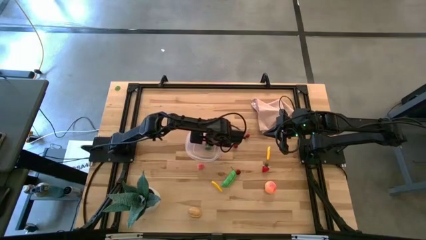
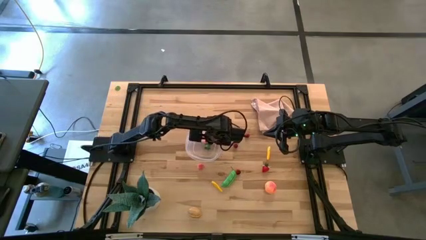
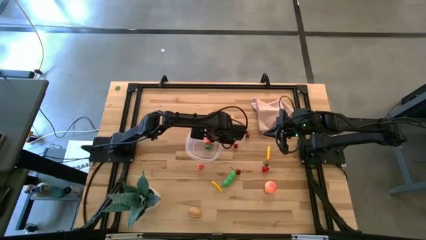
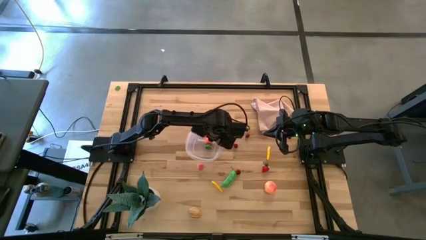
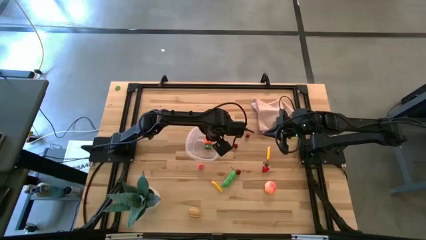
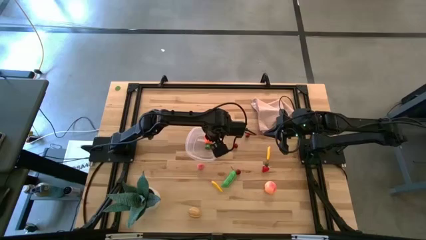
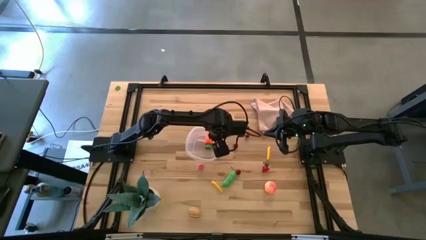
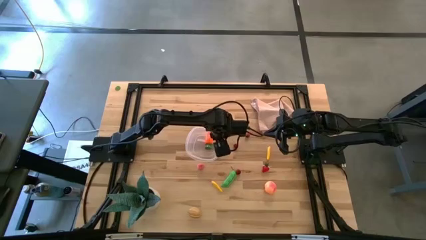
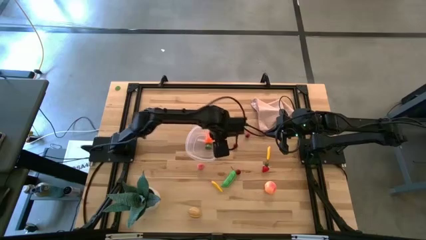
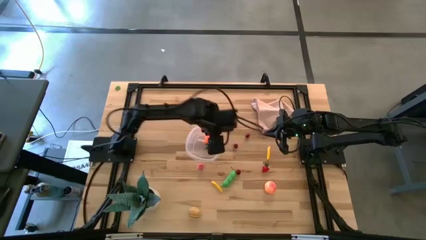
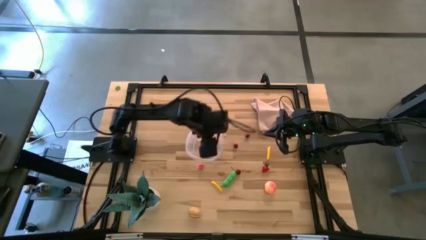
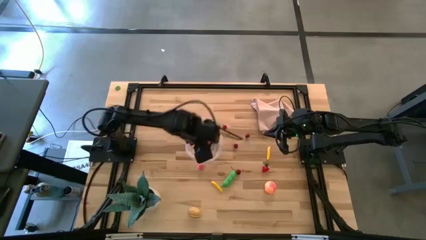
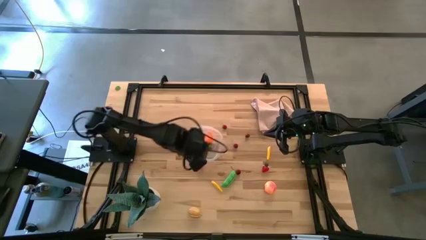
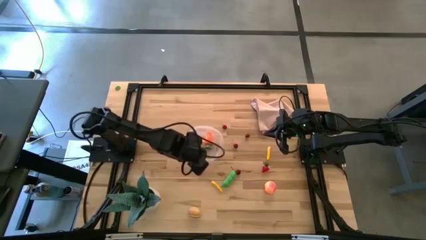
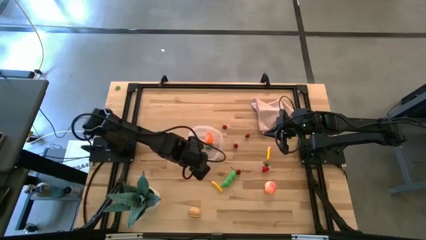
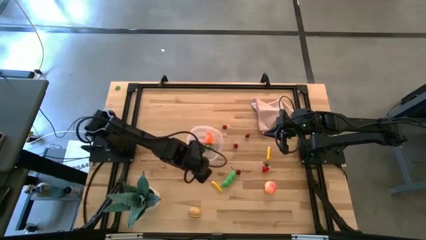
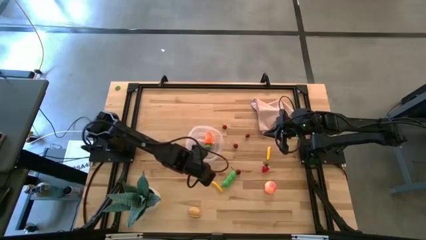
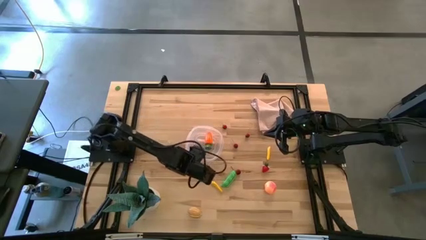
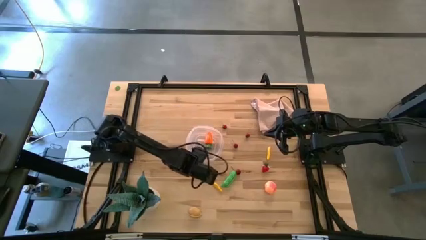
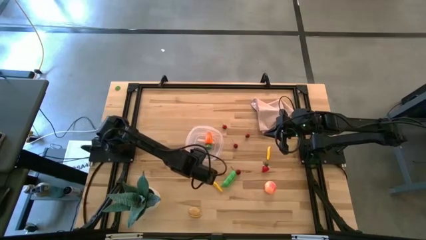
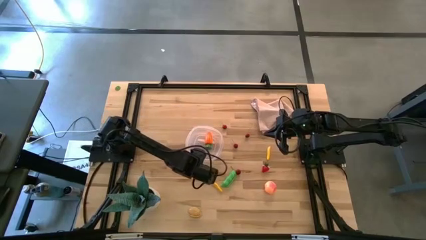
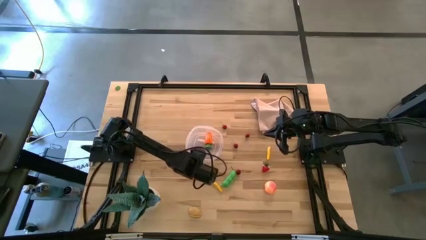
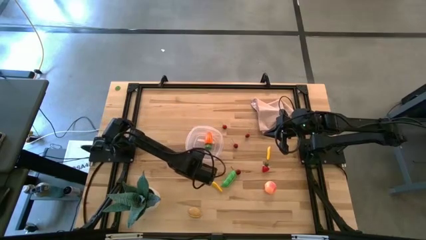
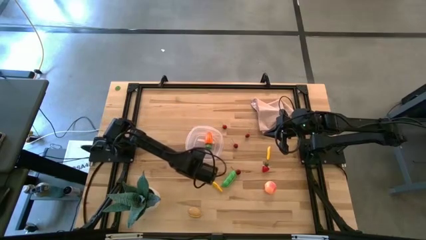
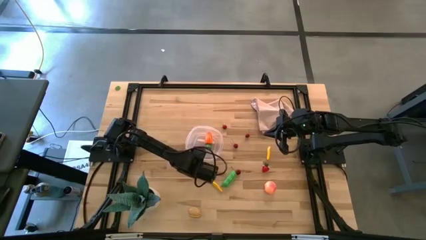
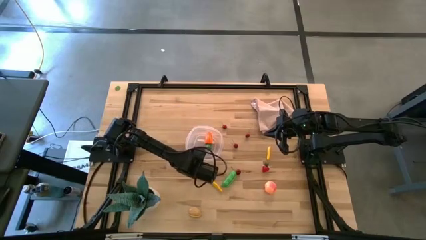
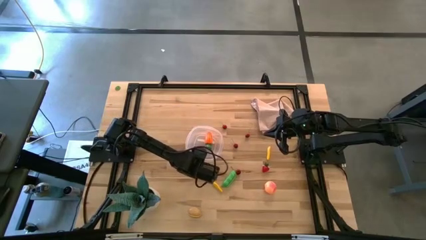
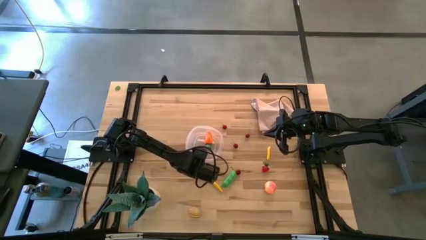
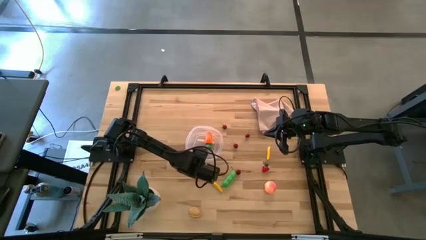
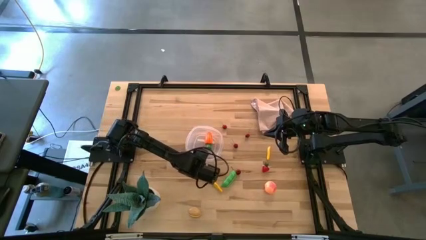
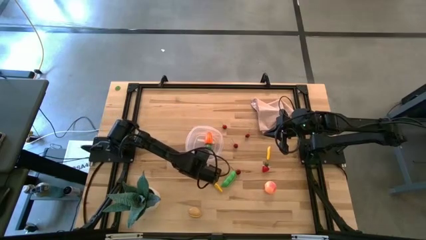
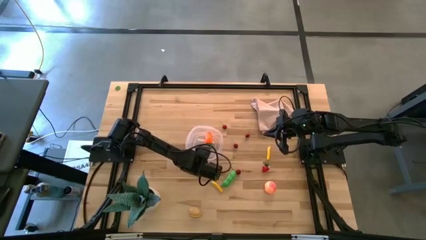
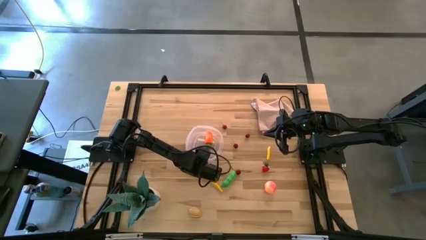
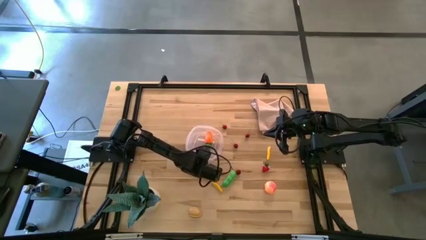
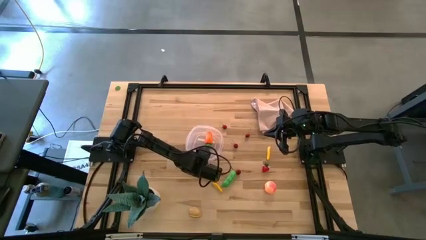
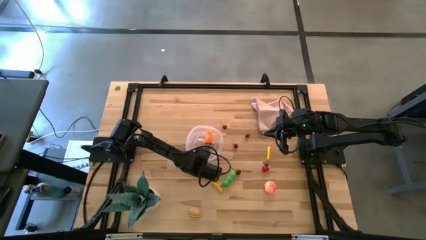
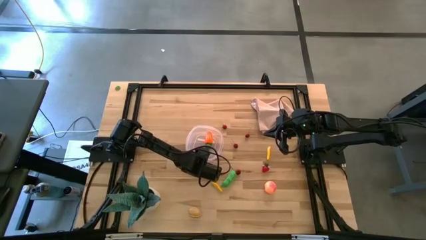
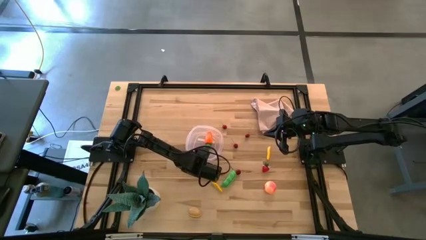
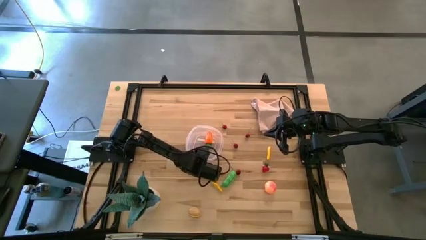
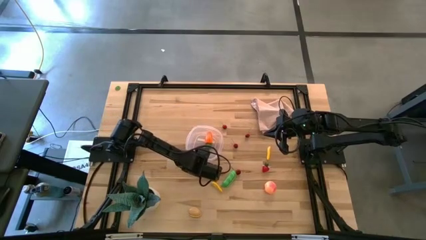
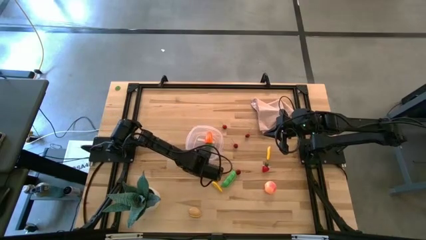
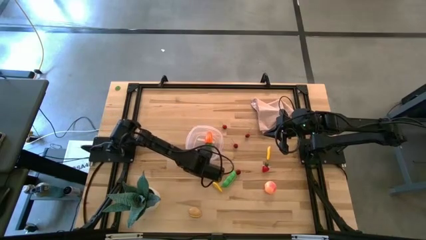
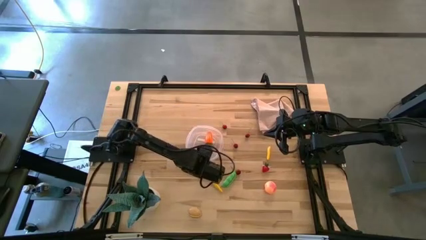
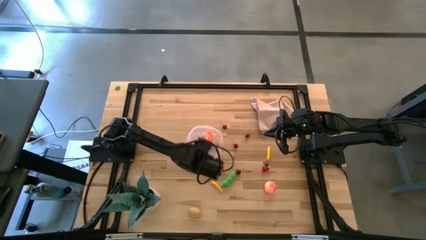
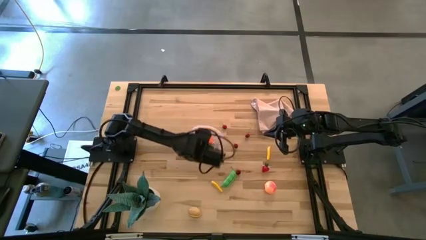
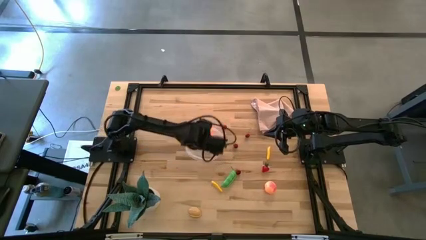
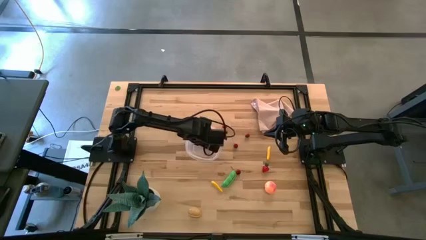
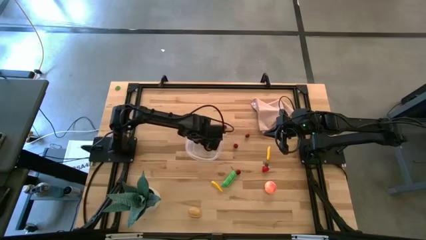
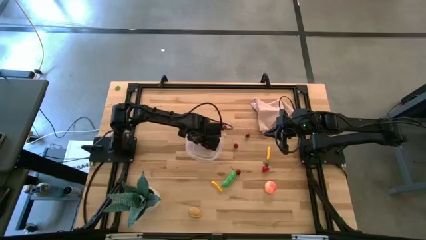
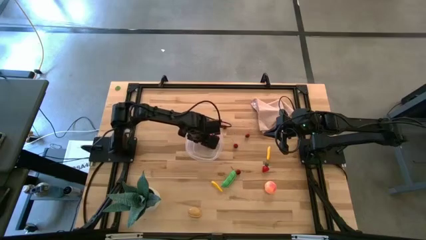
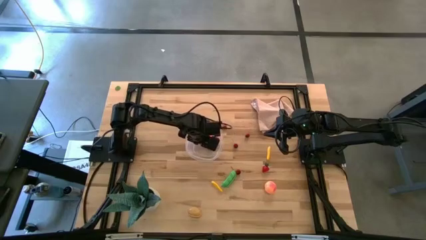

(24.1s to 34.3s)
Task: Pick and placing Produce into tupperware
Put the apricot into the transparent bin

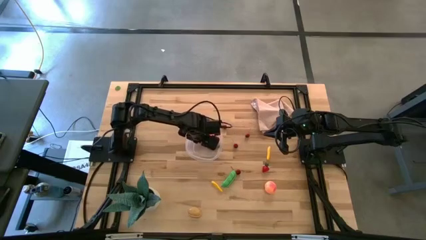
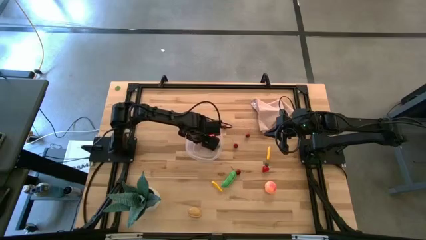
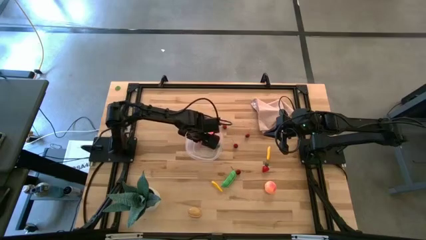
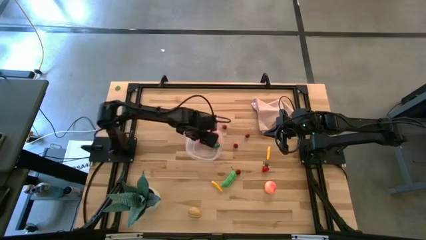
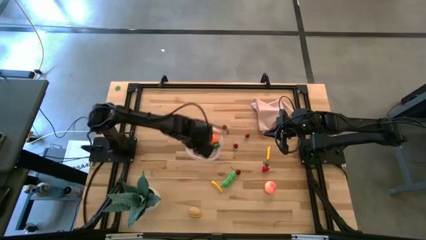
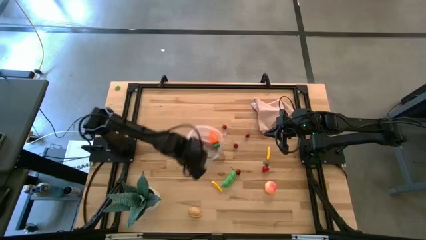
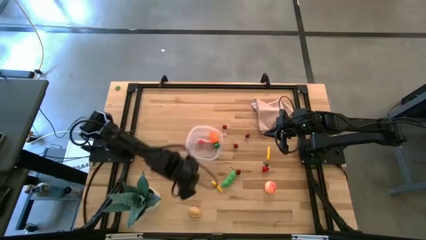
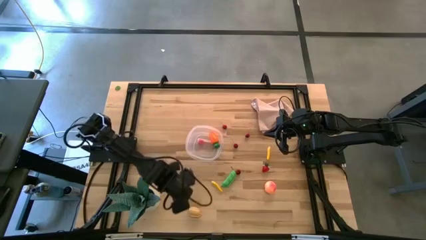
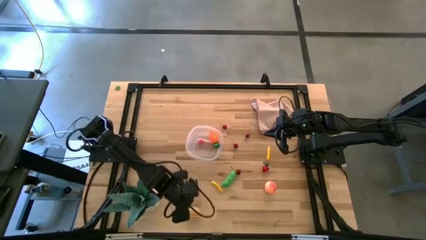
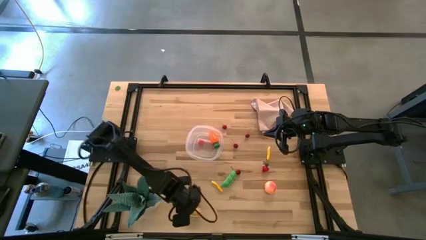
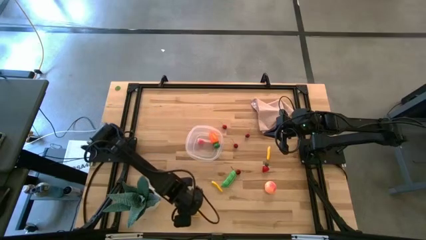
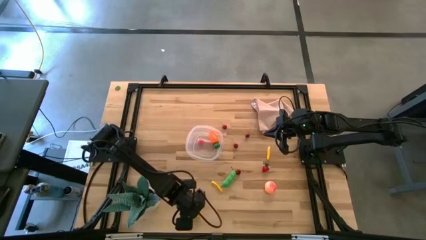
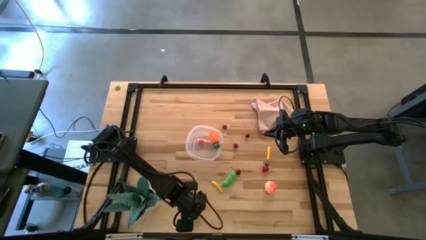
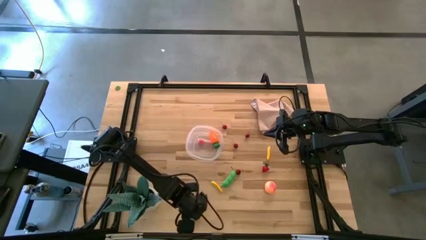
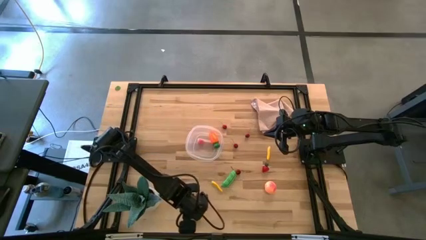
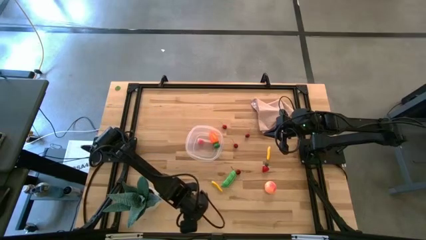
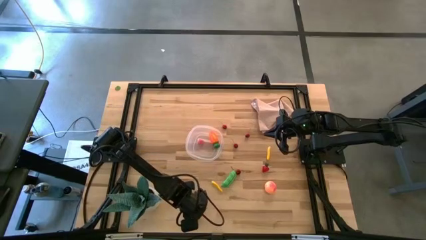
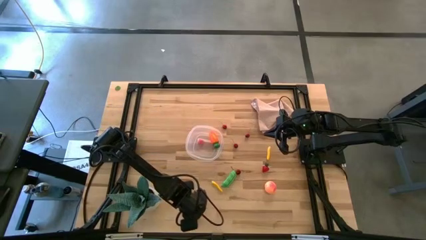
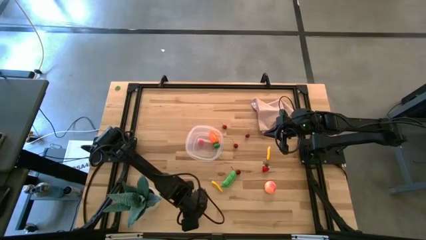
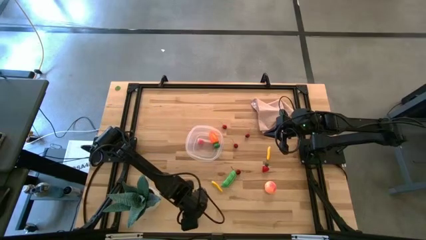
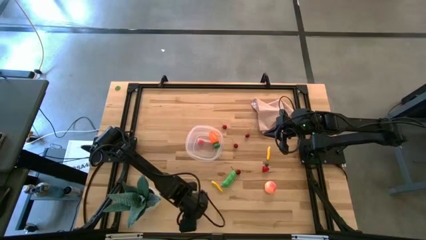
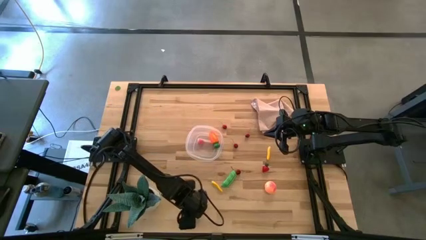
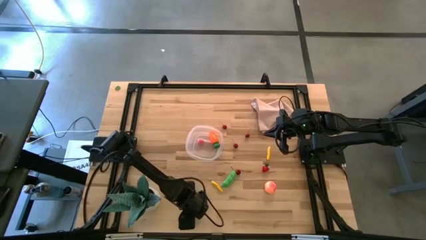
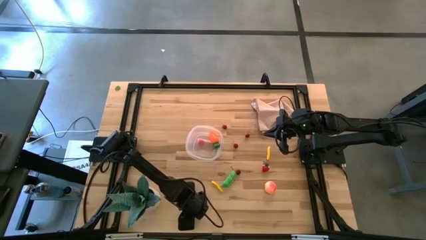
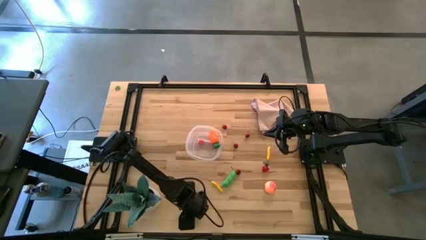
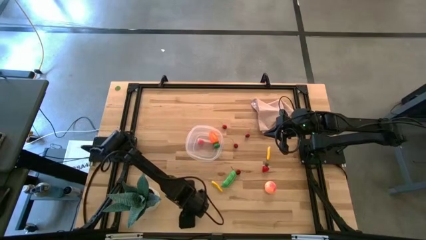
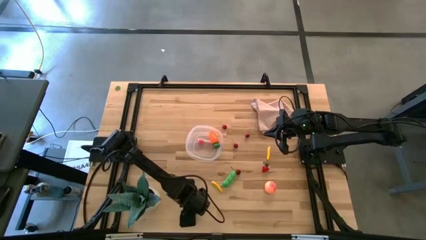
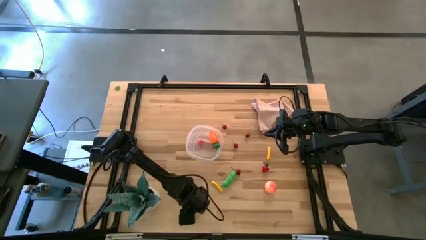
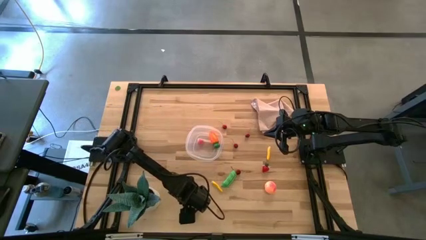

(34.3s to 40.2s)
Put the potato into the transparent bin
